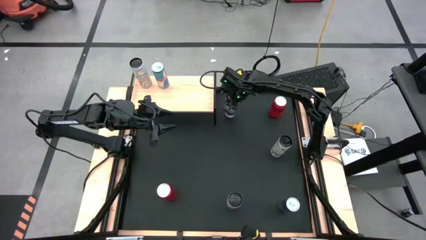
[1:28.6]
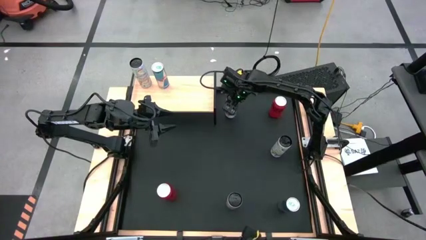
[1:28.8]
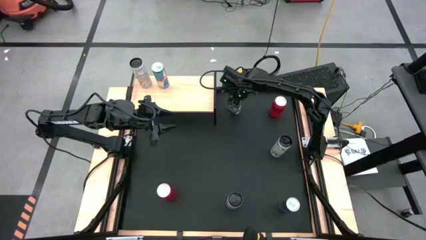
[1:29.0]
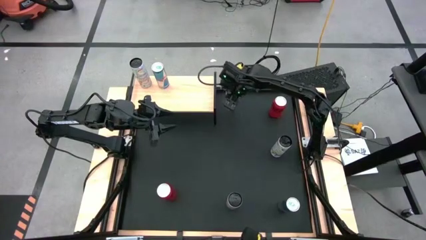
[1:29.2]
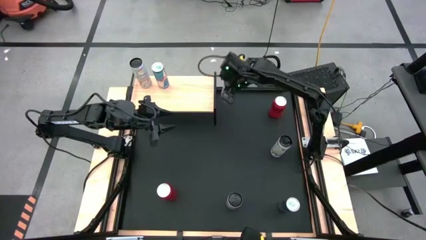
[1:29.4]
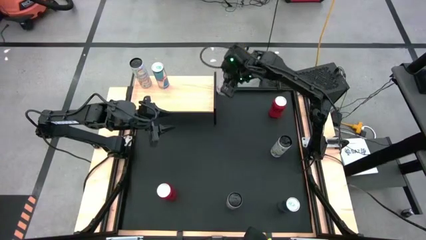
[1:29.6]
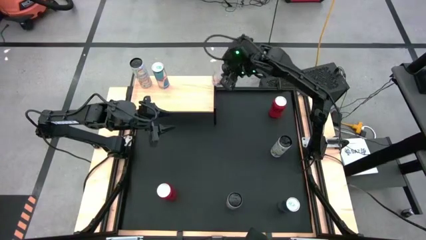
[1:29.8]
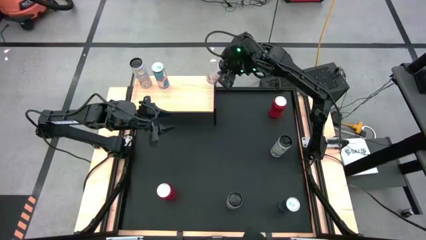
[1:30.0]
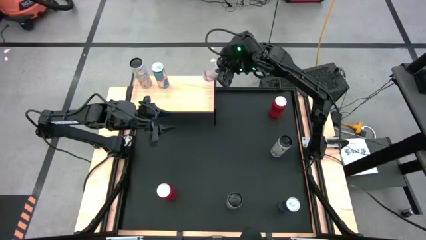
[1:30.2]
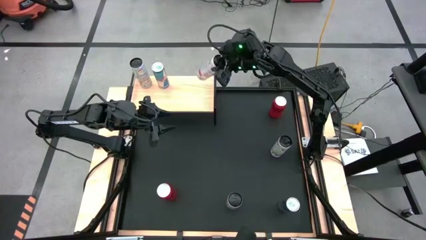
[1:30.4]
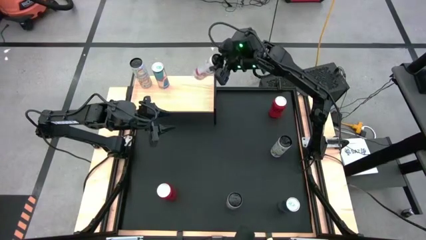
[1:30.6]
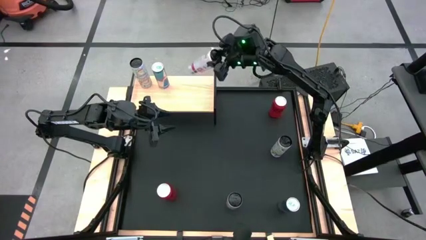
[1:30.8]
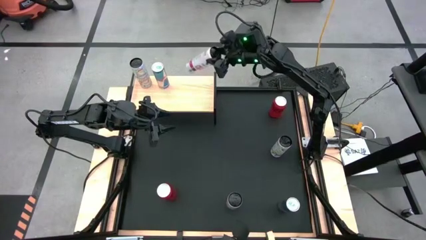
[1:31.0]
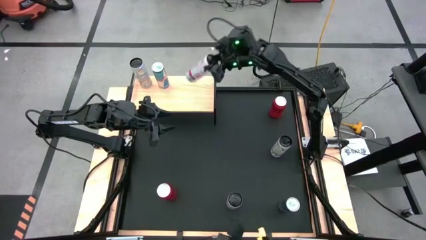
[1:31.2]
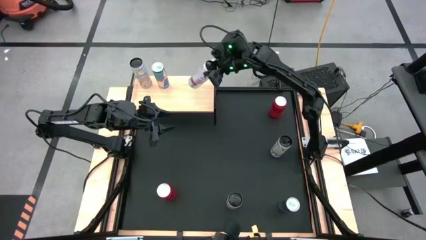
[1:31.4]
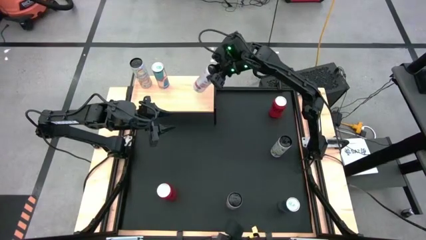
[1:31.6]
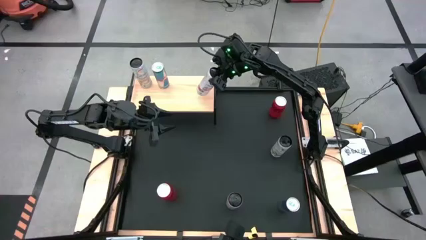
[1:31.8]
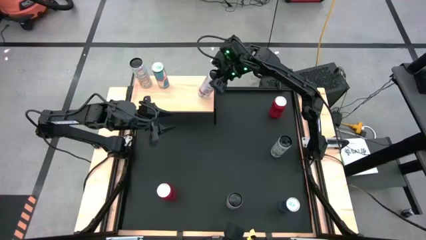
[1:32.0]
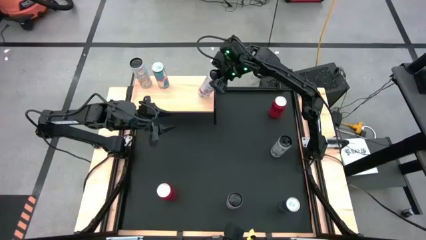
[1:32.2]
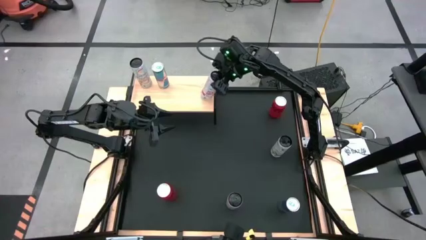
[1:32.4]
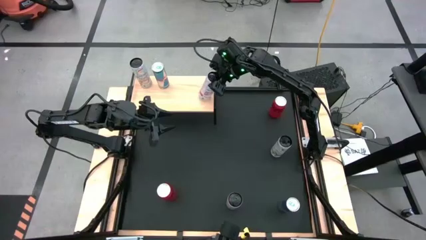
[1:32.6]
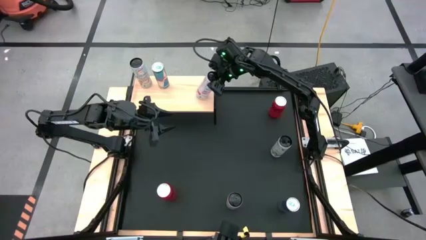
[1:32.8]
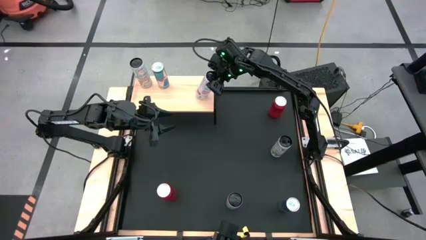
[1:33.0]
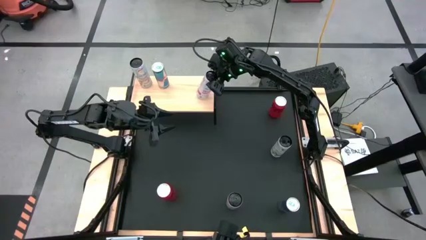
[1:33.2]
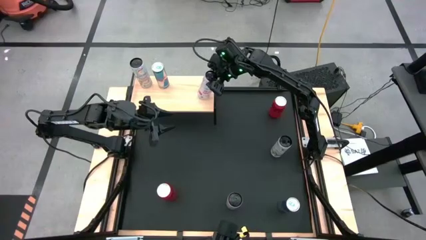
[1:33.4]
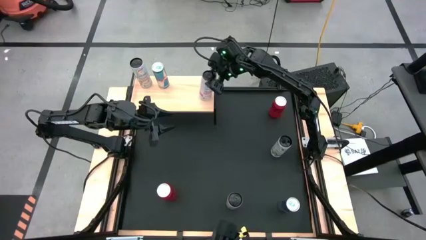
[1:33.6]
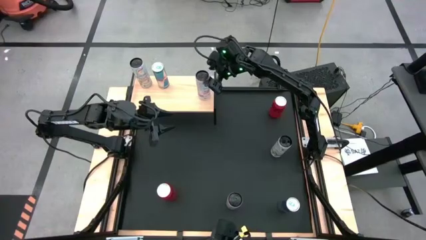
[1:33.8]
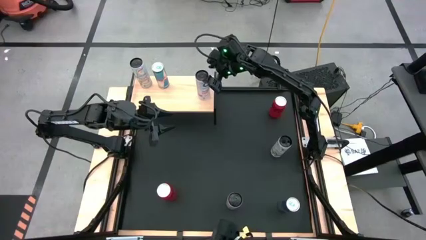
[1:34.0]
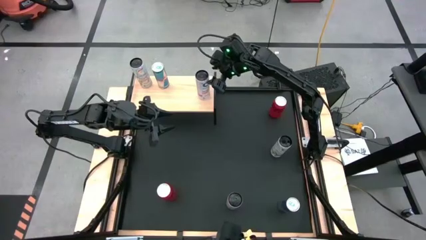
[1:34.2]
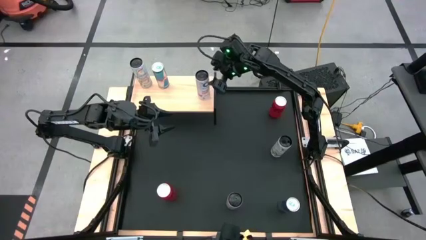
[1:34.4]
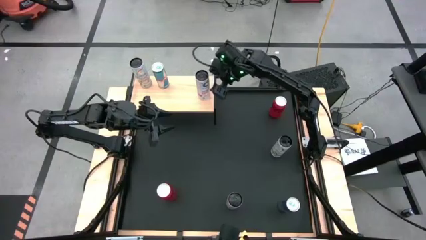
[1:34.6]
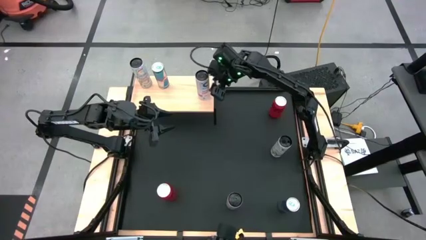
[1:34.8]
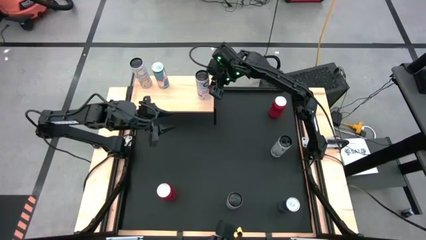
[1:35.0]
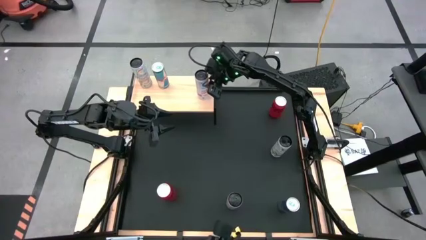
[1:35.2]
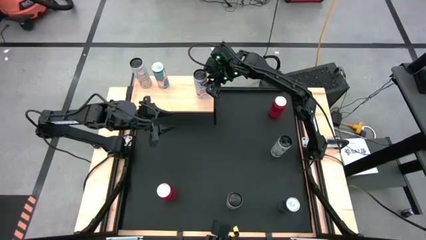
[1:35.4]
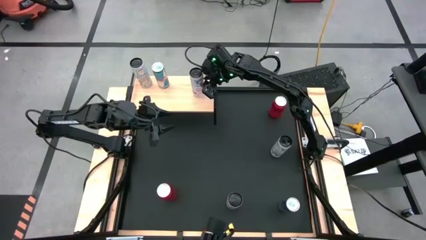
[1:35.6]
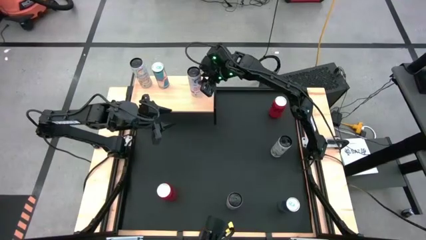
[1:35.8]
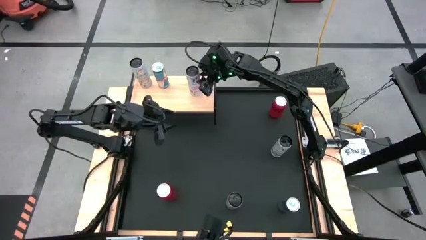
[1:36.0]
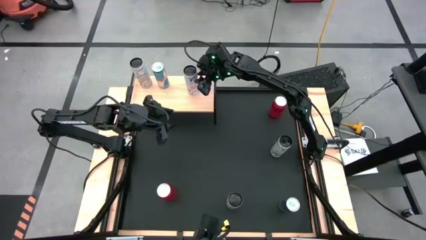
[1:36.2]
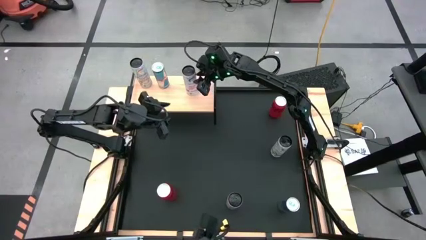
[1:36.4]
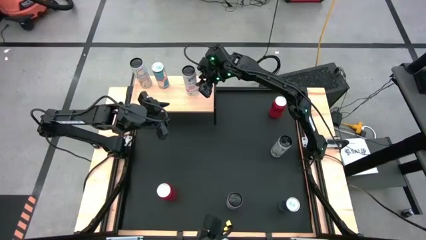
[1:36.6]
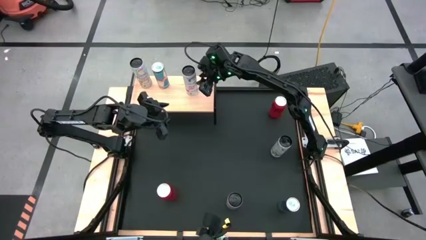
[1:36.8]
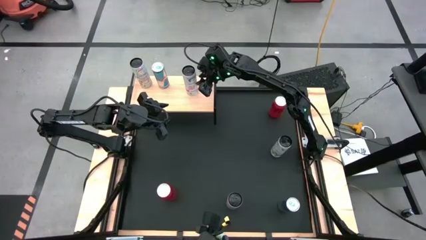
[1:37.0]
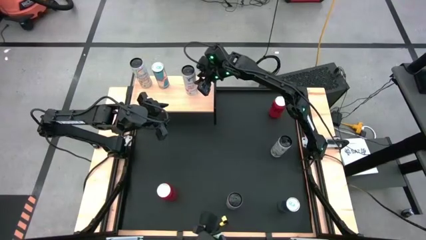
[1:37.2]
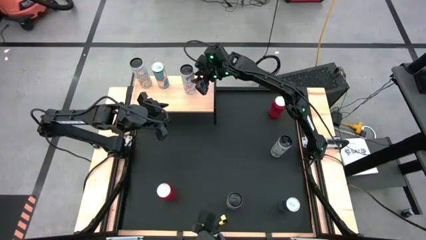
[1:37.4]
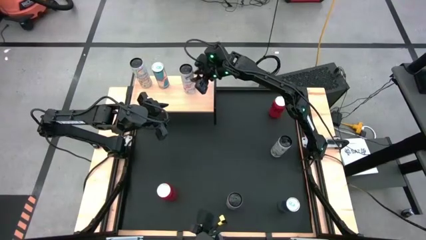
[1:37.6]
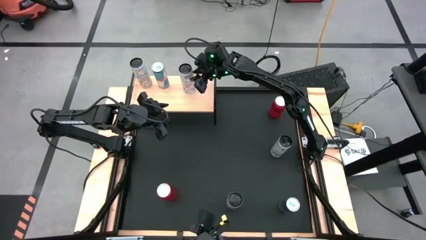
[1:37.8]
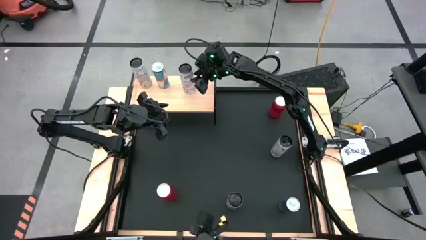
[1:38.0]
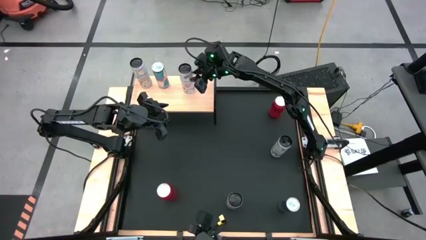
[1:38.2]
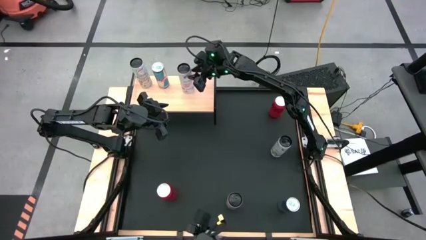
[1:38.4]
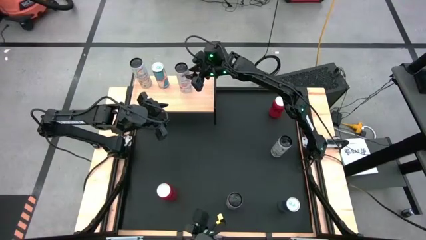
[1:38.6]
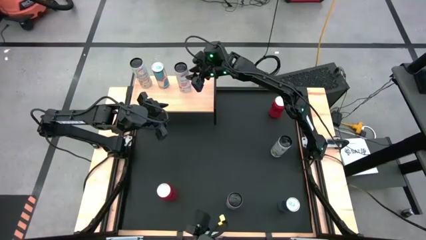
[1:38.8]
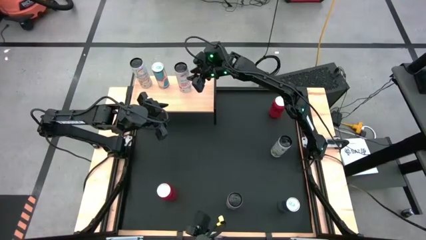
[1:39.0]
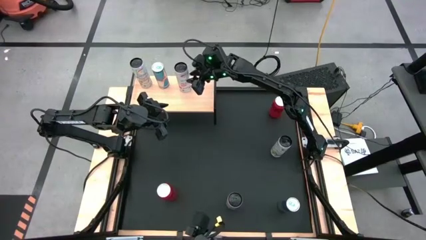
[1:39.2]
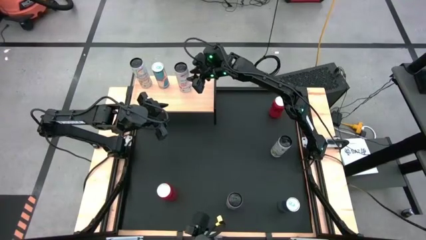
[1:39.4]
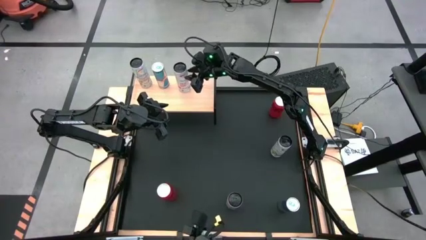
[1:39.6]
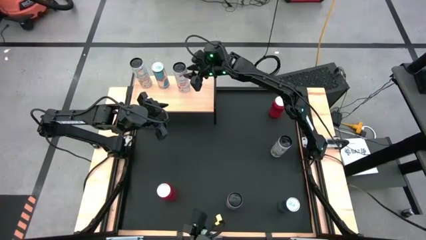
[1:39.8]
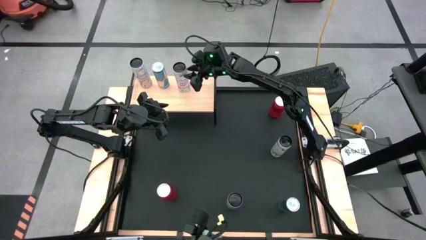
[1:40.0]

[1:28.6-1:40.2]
Task: Place canned beverage on shelf
Put the top white pink soda can on the shelf

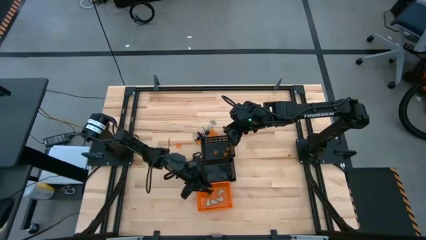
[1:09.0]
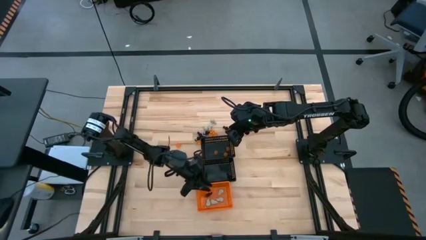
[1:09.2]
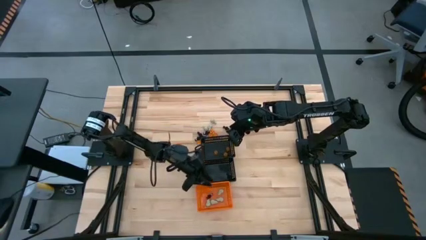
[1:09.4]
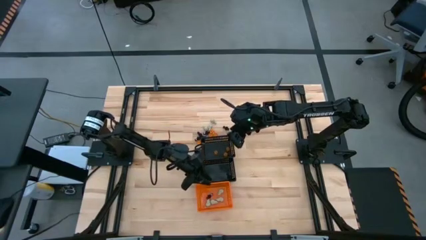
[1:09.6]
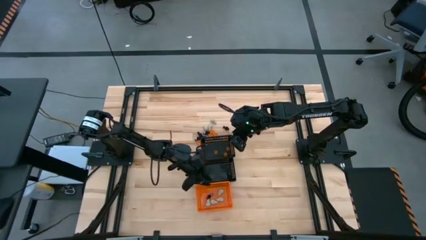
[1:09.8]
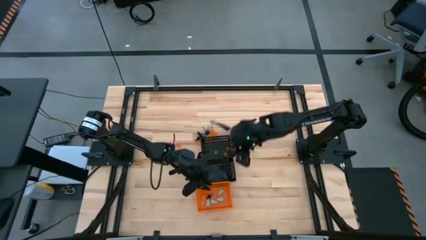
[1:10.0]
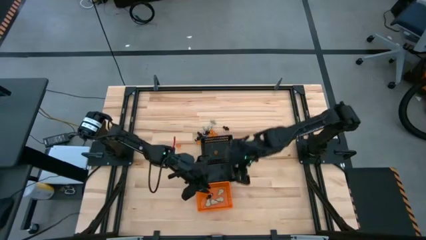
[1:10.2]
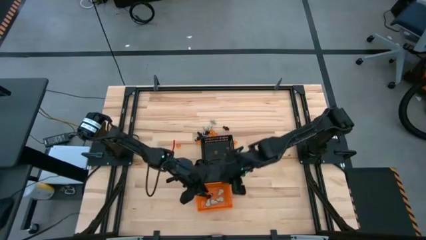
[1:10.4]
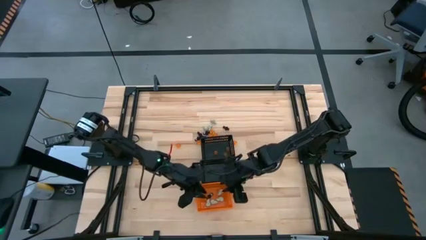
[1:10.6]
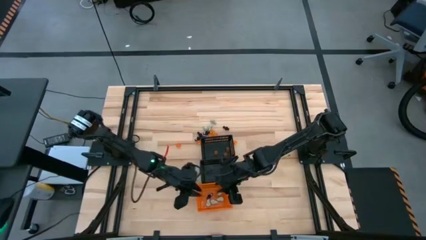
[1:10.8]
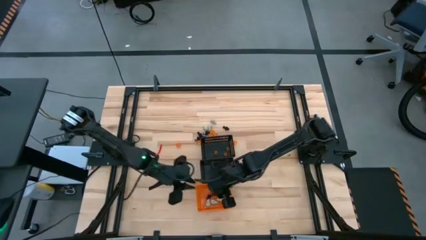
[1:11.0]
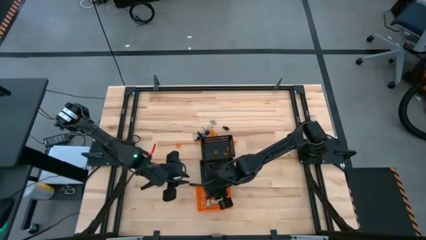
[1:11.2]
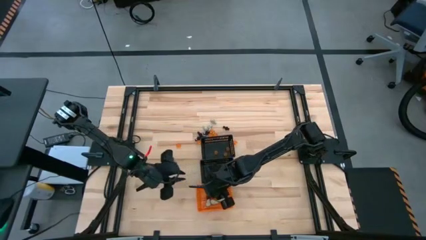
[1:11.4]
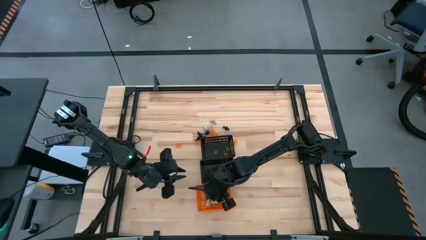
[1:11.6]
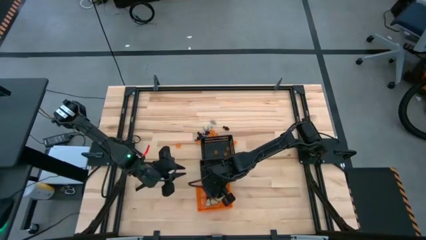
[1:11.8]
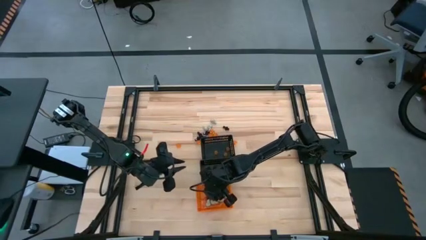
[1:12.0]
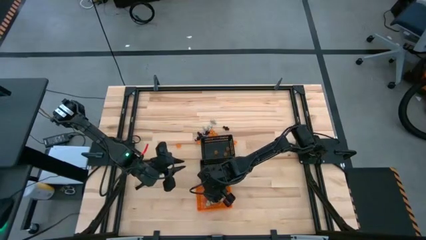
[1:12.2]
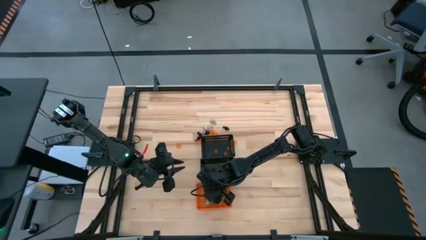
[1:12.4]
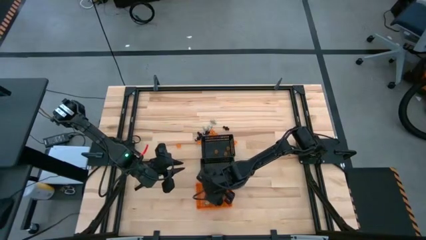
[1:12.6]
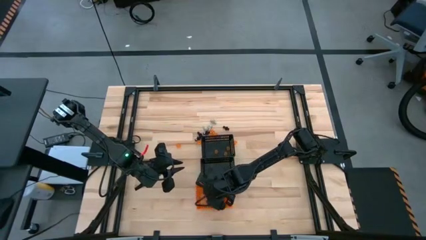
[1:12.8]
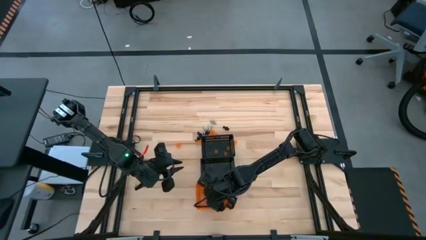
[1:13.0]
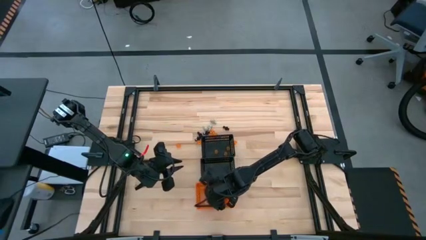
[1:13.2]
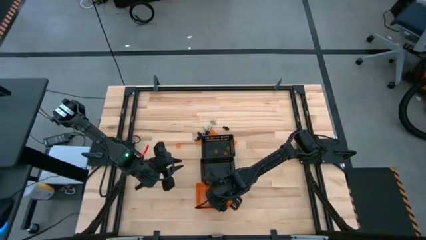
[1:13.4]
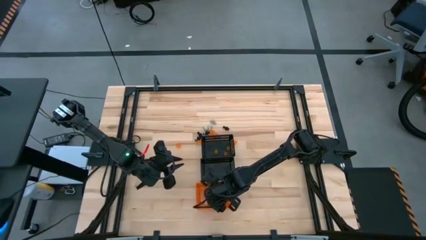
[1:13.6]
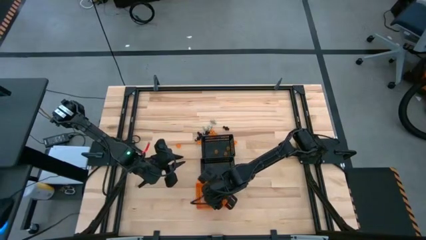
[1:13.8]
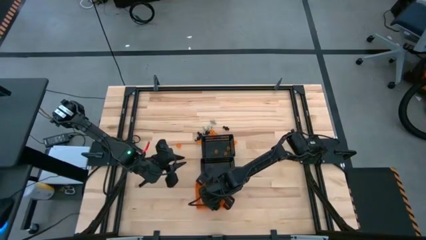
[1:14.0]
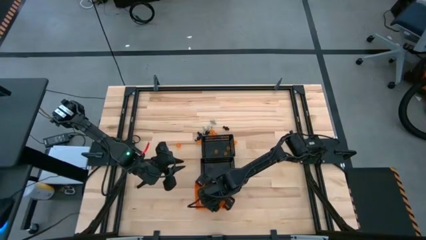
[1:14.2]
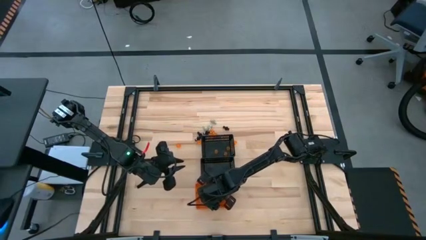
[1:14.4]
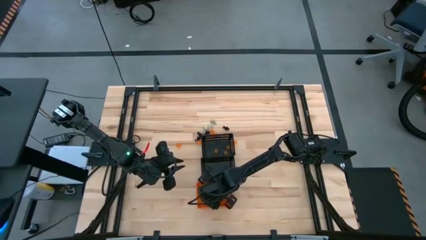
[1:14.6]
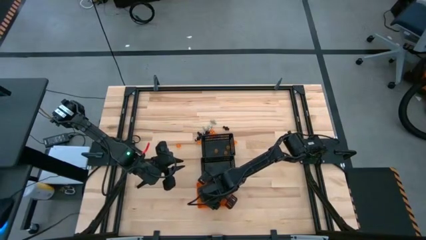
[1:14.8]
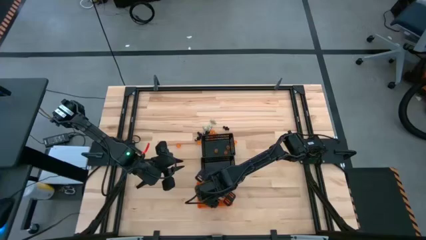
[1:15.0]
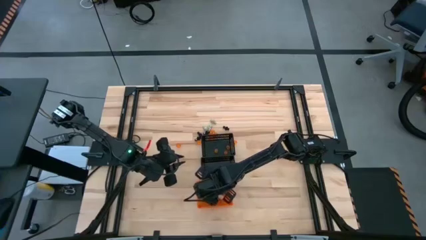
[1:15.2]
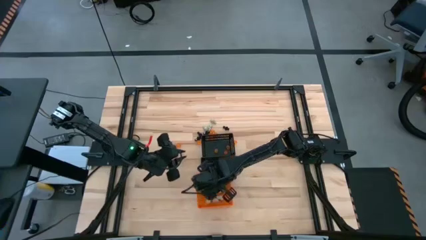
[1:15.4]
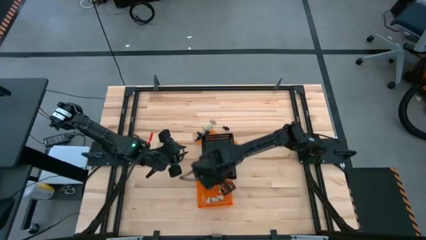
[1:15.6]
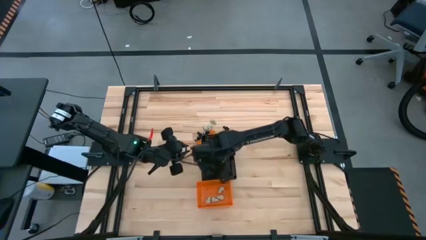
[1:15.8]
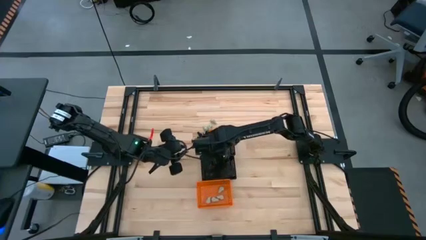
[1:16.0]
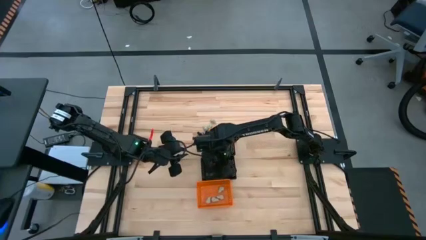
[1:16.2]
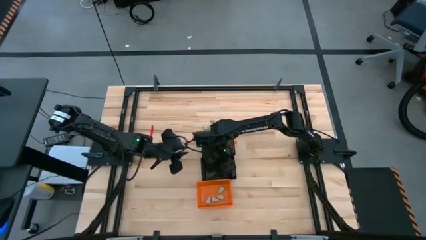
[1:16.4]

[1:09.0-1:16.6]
Task: Sort Halloween decoration
Put the black skeleton toy into the bottom black bin
